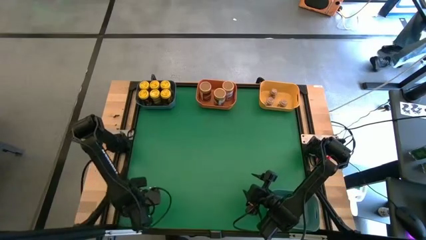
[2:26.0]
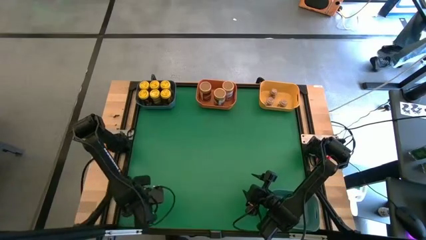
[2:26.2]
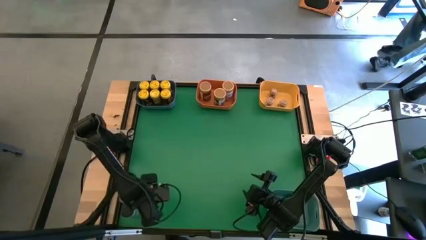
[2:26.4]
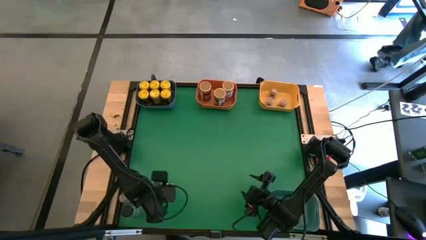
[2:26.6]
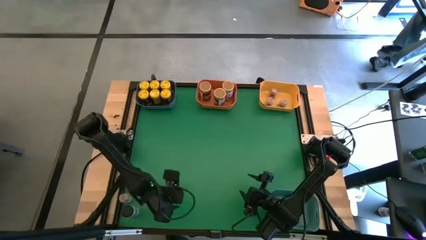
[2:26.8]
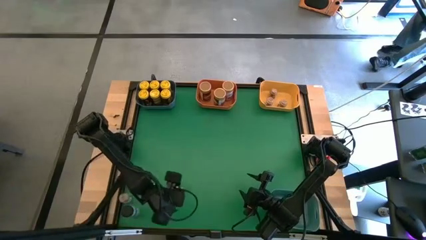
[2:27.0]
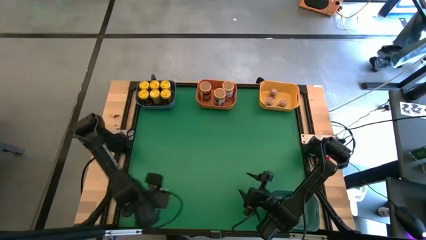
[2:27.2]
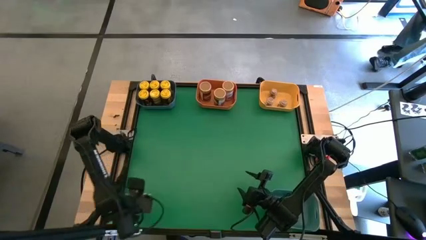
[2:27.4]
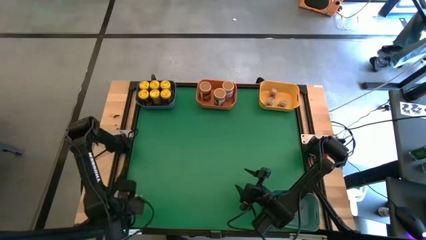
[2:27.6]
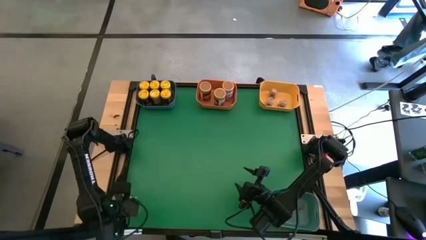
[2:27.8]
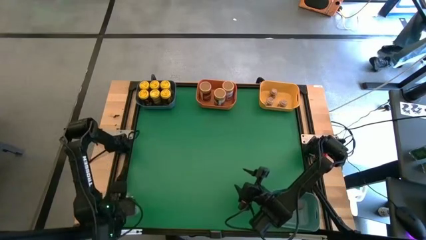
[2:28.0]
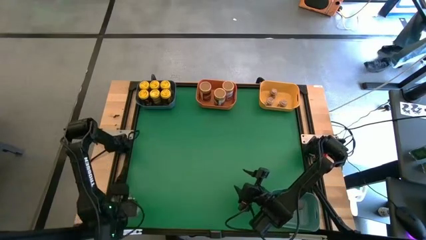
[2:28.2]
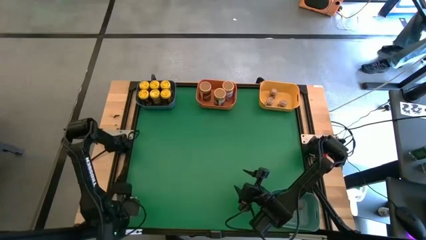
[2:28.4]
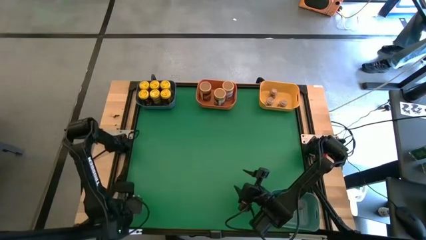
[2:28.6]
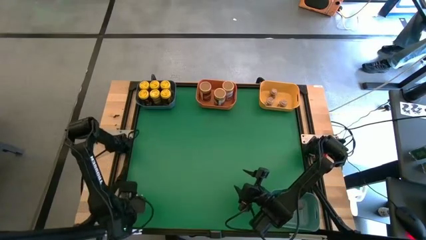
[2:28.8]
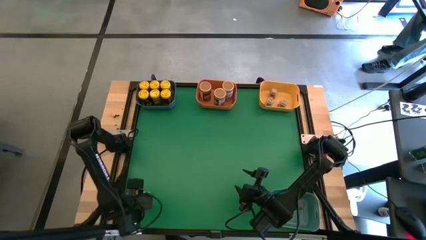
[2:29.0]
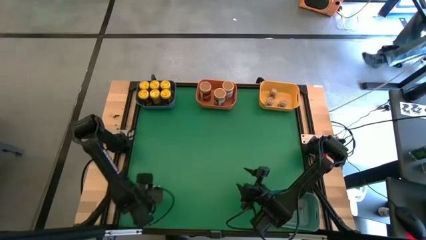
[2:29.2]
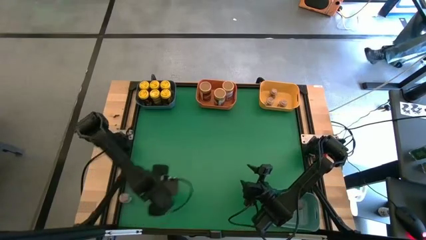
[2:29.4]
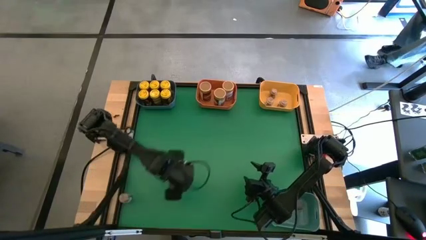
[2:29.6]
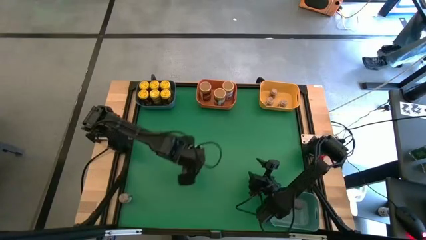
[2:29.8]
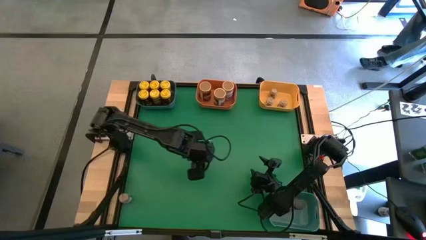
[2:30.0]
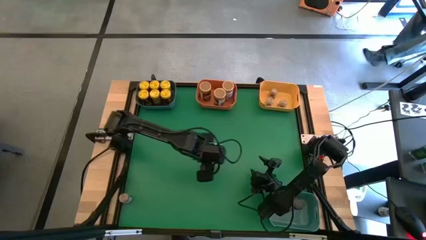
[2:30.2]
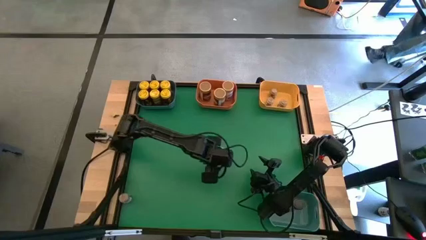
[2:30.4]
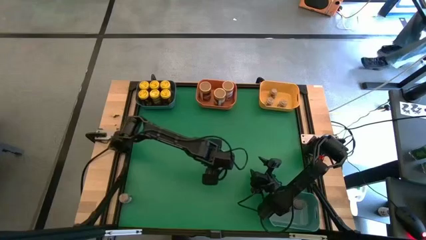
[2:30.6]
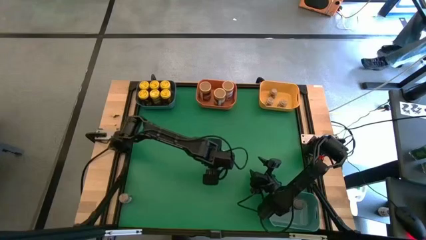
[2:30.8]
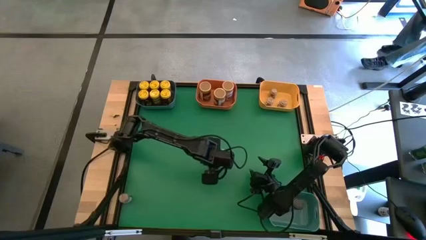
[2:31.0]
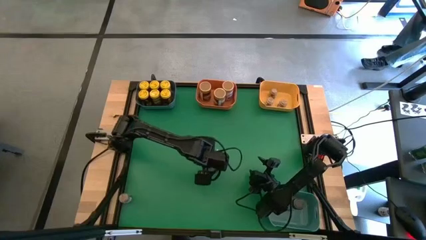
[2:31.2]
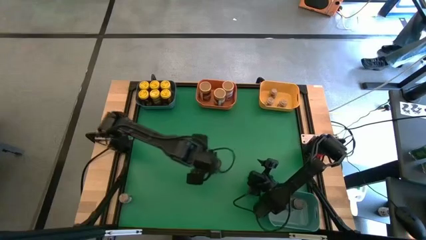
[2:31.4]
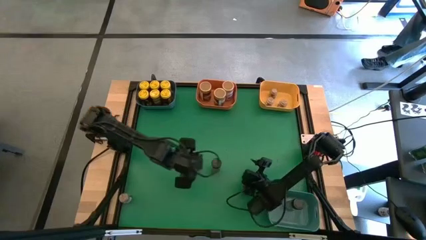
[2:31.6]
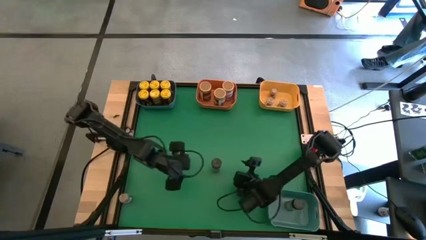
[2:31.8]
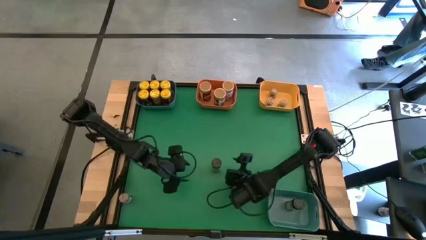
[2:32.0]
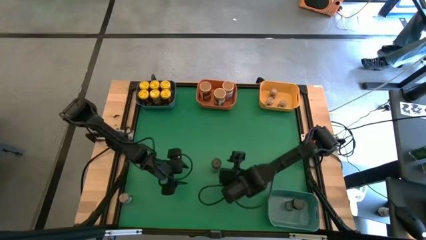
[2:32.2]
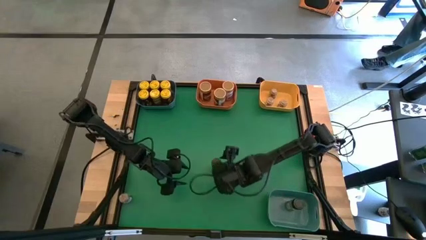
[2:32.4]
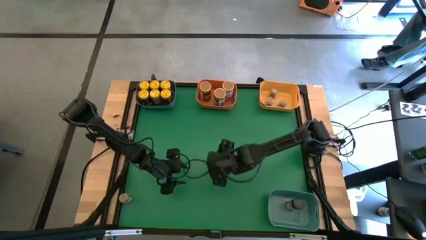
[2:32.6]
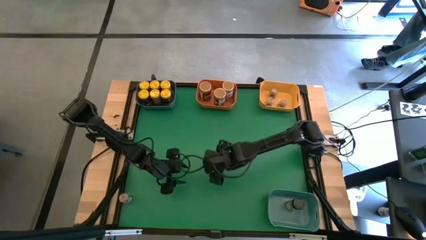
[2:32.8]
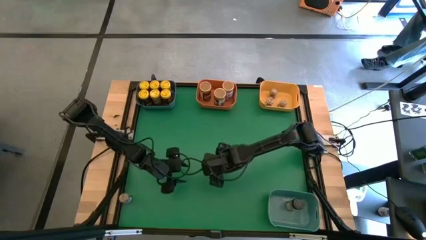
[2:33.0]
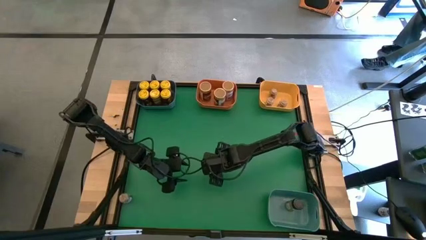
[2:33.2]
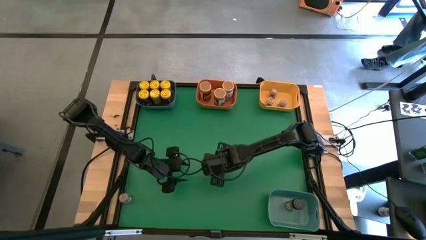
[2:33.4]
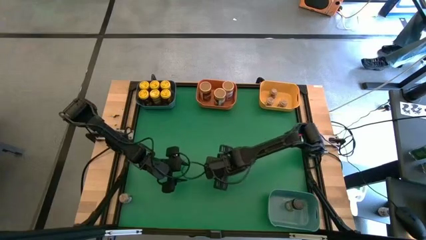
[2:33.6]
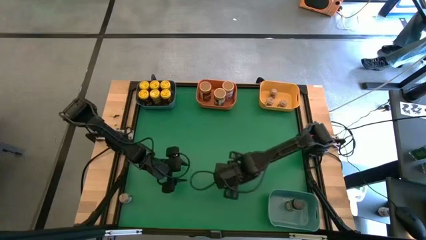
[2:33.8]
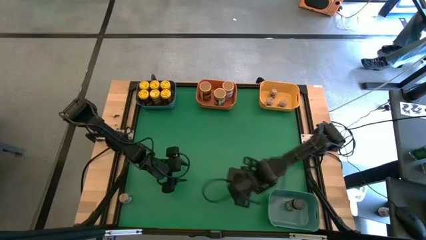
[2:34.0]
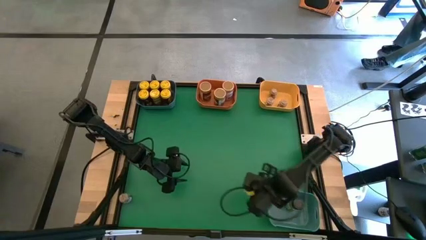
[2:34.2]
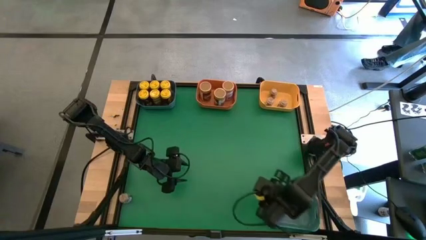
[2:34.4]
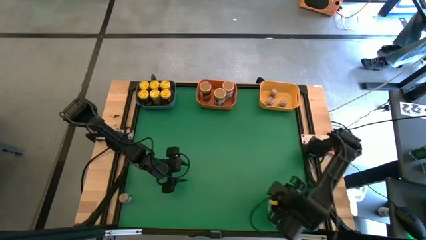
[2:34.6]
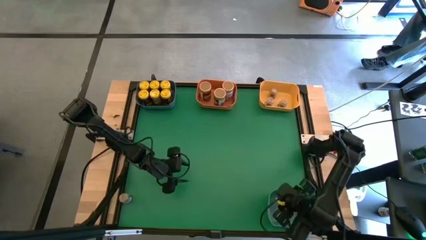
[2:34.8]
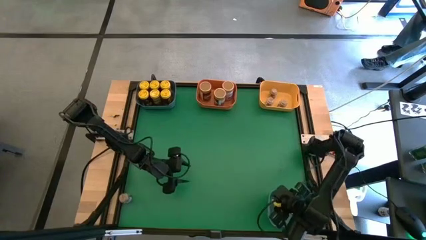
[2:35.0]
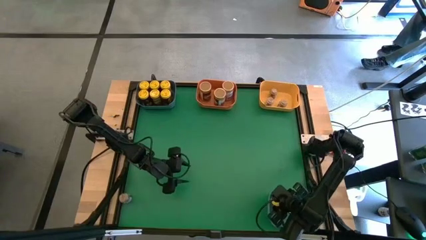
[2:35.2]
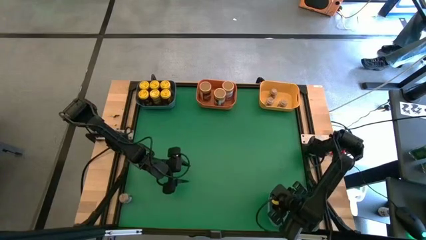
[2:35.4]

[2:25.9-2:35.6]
Task: Sort spices by type
Put the black seasoning bottle into the green bin

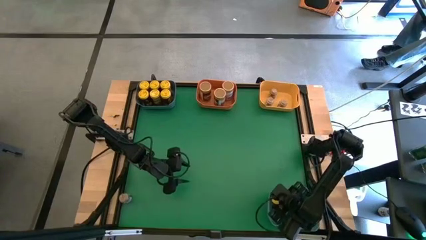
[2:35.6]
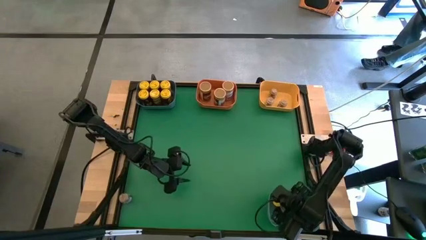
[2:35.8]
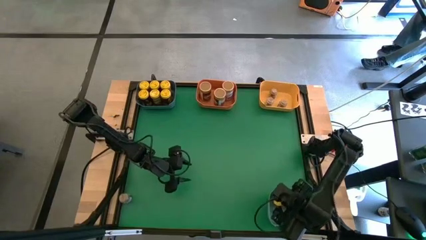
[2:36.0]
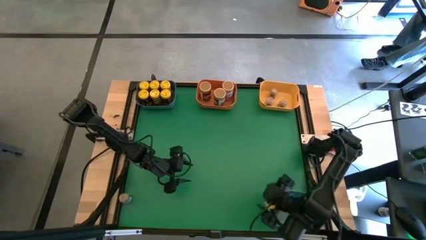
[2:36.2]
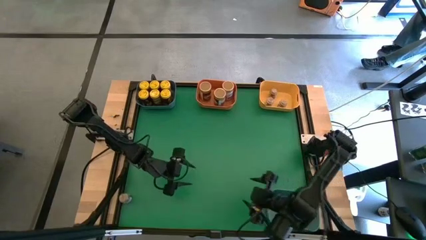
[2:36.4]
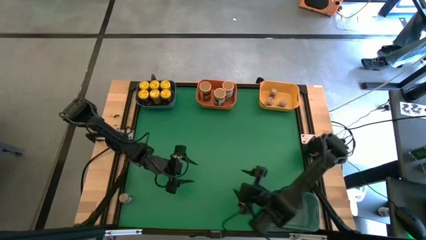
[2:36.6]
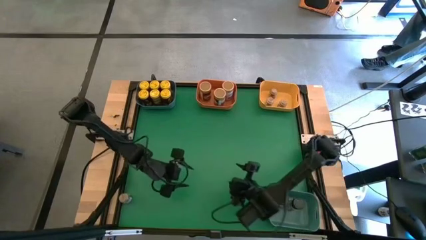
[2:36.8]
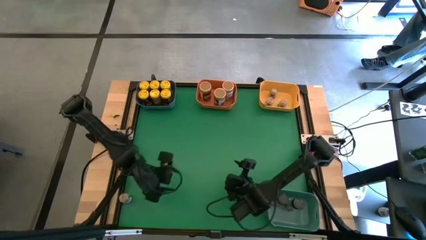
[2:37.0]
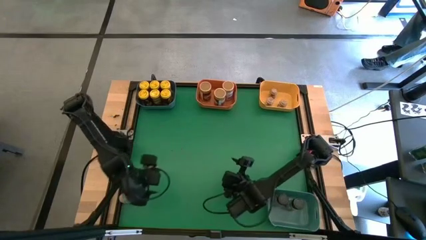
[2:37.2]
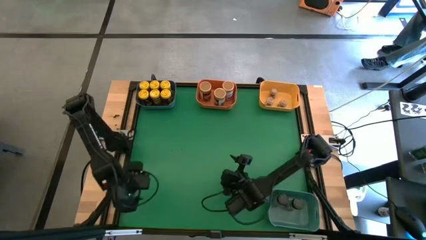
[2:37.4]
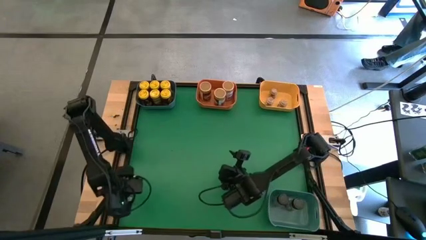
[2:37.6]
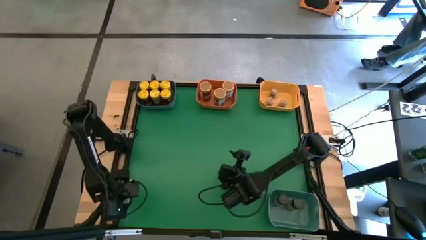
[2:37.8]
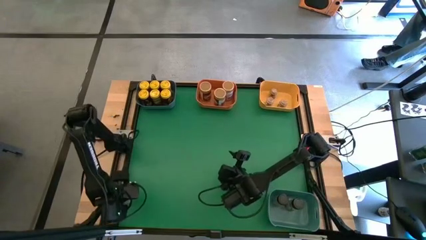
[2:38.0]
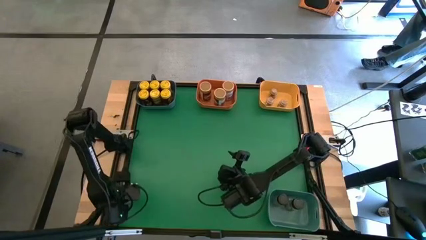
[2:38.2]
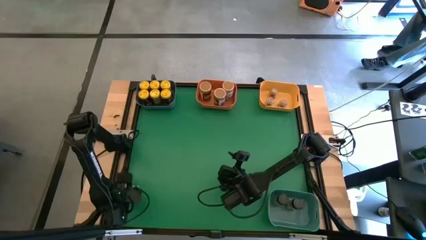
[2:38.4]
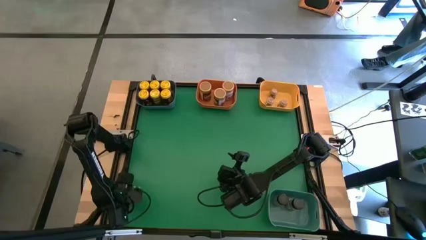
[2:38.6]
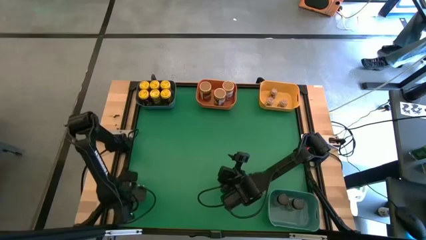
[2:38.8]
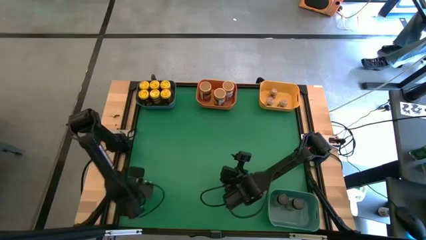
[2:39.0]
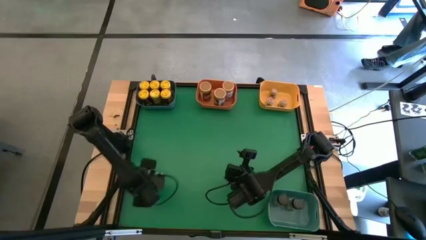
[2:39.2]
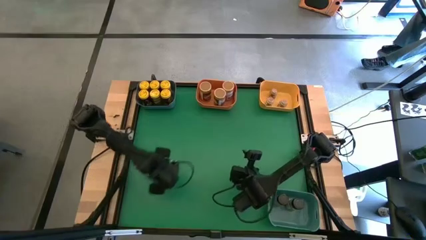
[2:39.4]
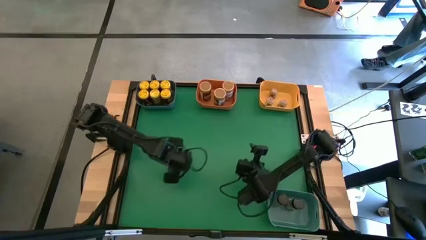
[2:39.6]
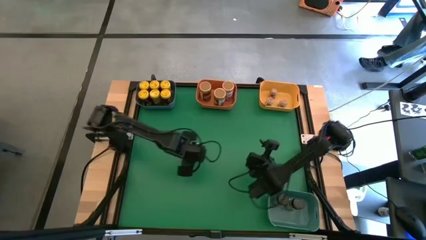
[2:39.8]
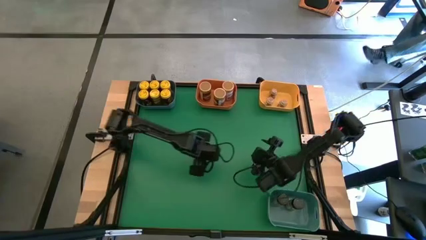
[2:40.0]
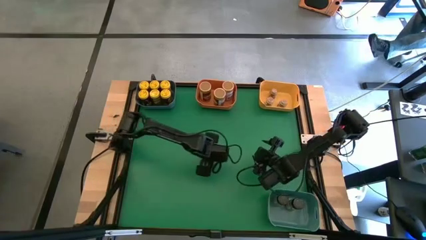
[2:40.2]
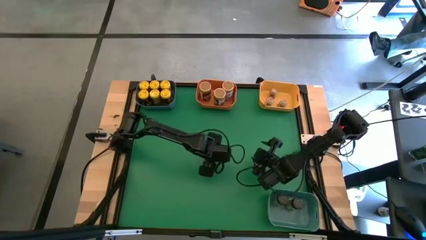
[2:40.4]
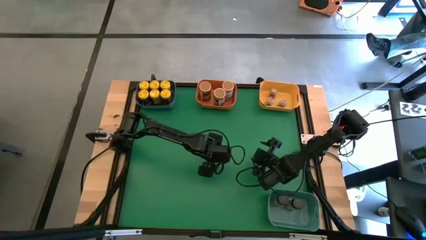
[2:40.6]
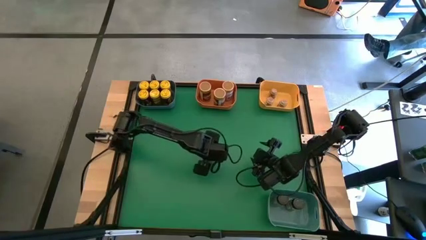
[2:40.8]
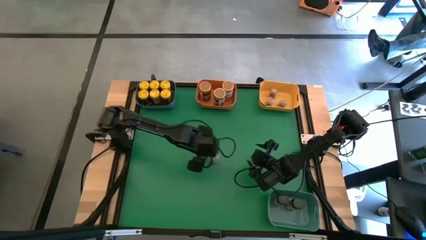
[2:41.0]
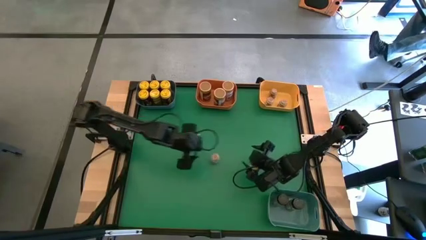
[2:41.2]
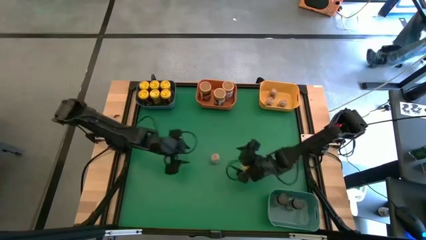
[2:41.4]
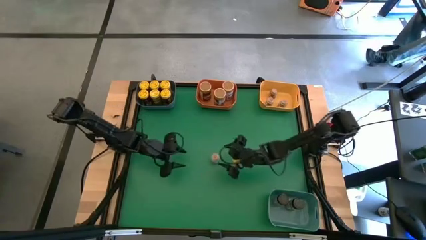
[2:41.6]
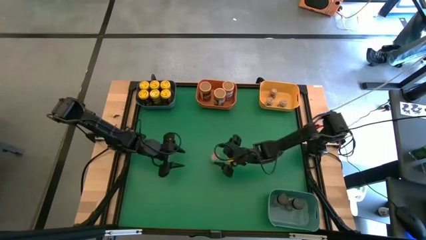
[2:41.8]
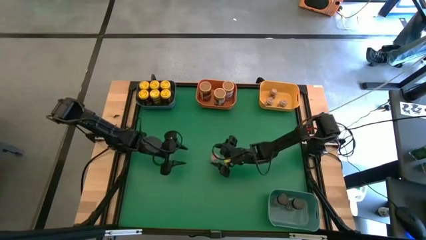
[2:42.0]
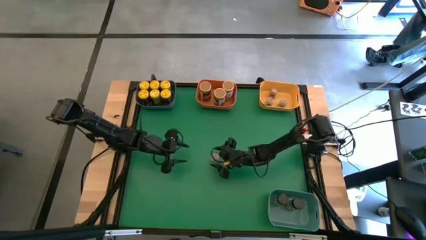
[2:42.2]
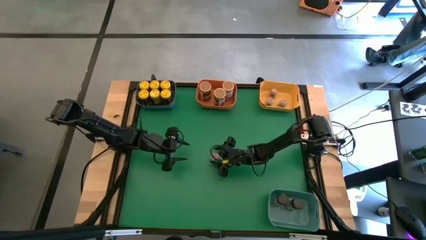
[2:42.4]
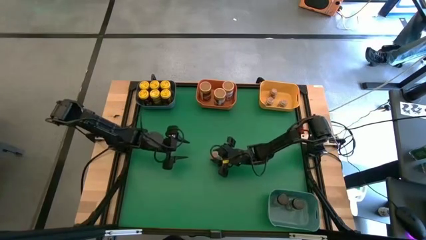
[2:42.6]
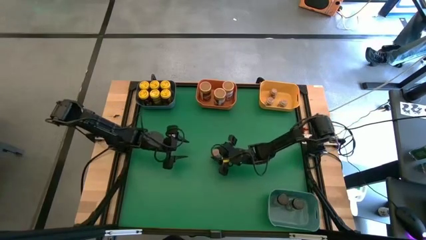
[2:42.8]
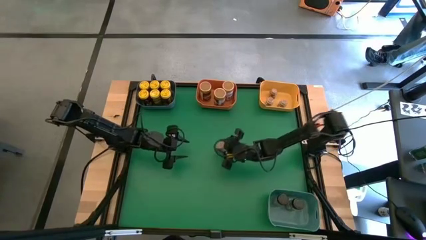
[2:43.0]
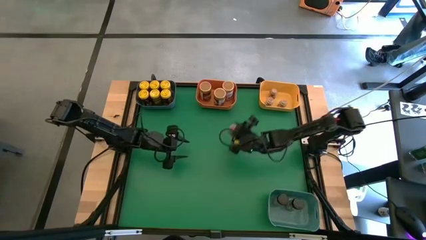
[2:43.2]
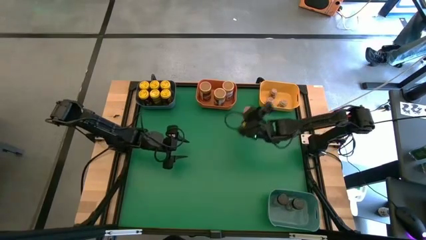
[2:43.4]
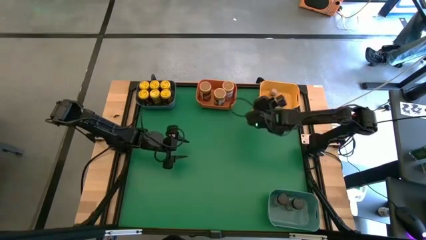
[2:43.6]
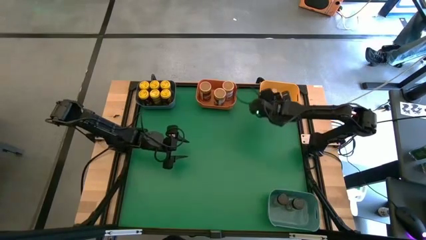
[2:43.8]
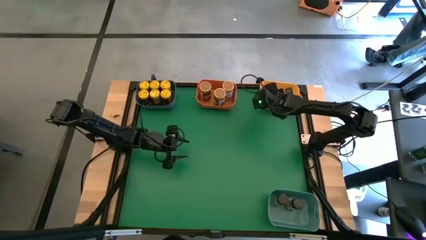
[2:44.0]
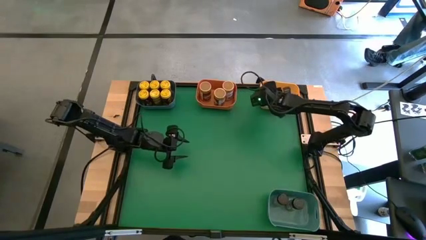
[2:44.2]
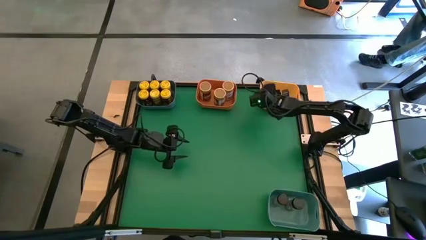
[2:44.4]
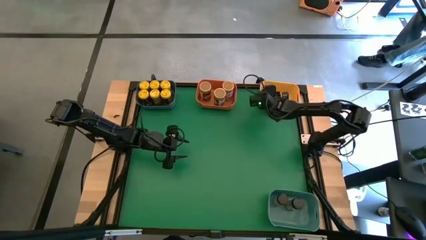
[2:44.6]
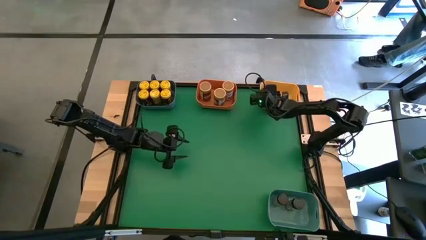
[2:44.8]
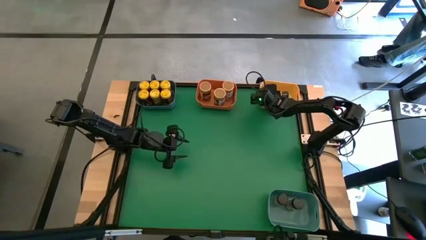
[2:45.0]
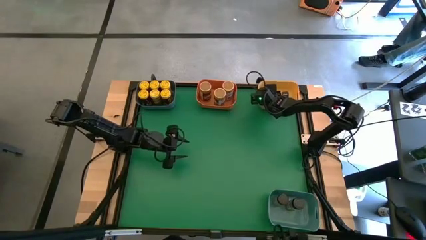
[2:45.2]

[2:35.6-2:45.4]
Put the black seasoning bottle into the green bin
